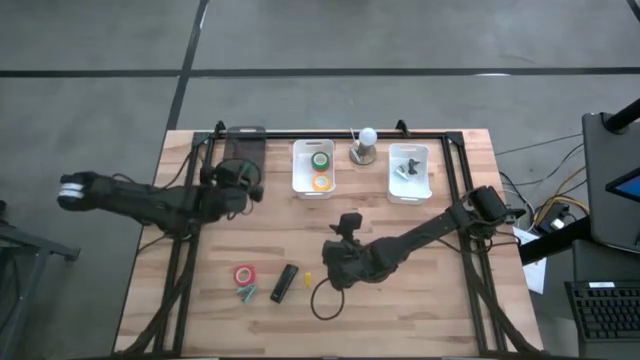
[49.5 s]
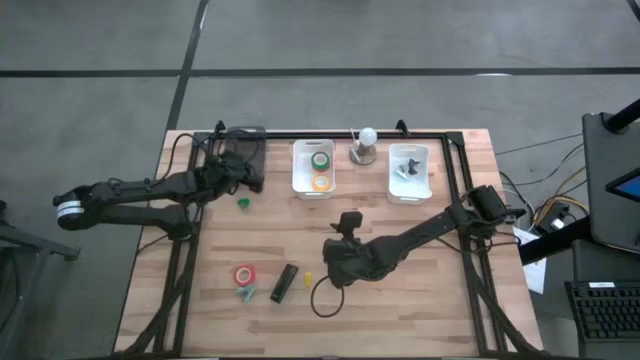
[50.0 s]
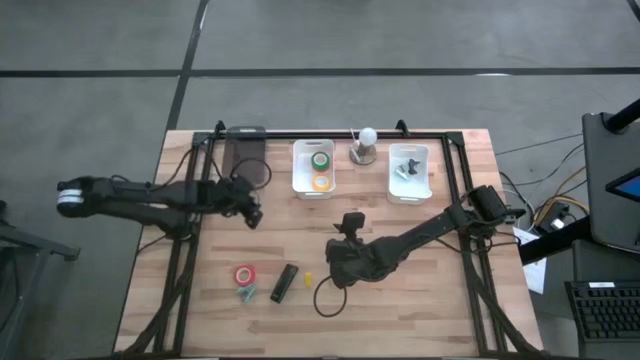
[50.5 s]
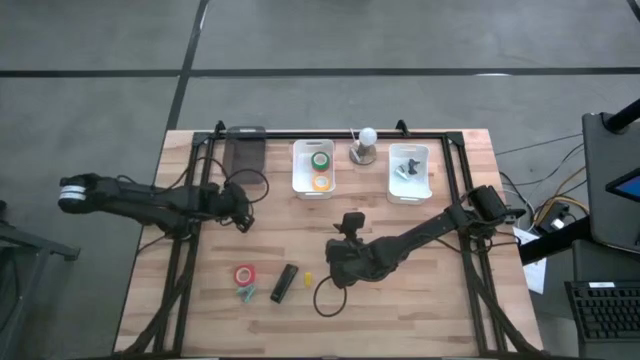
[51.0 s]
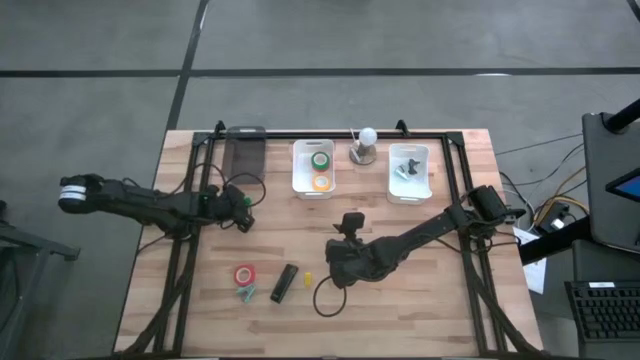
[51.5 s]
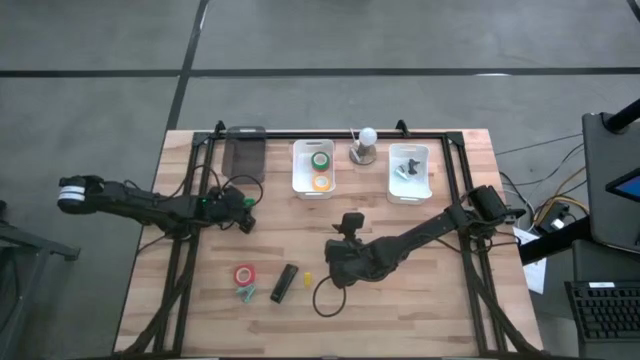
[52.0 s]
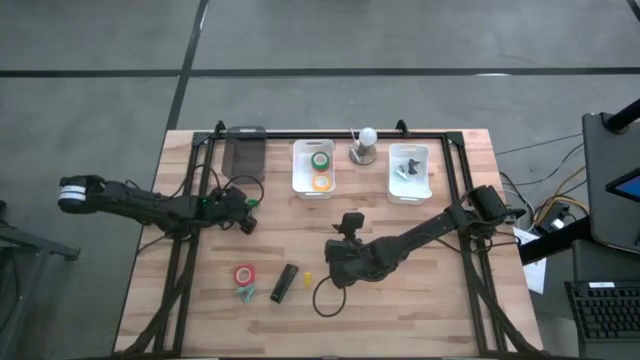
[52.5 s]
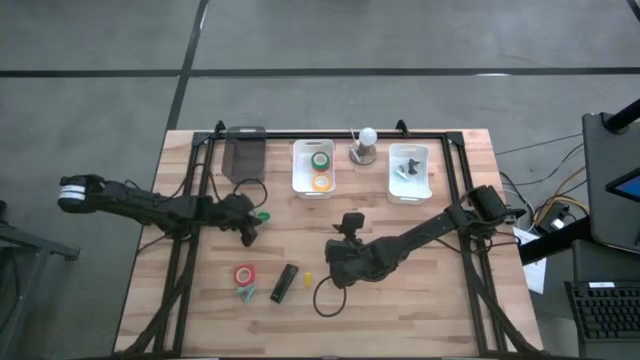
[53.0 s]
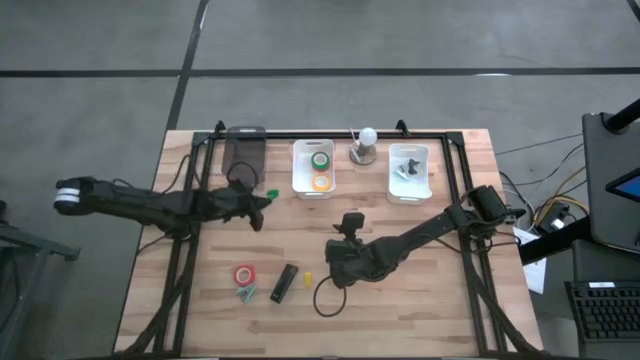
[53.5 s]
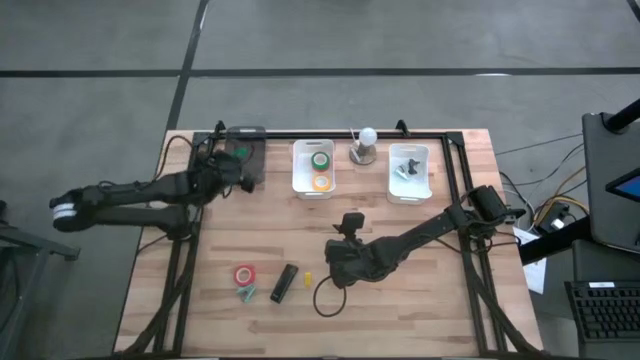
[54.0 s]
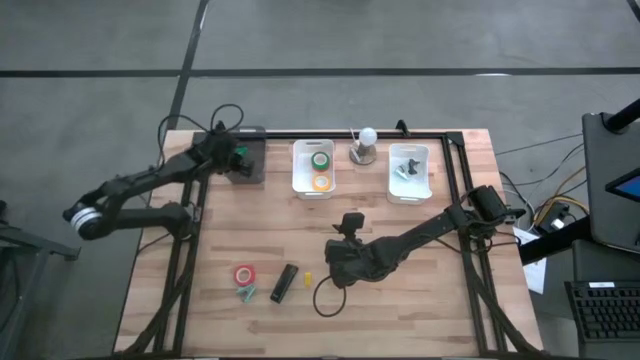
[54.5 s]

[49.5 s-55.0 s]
Task: Pick and place Stapler, Stapler remover, tape
Put the green stapler into the black bin

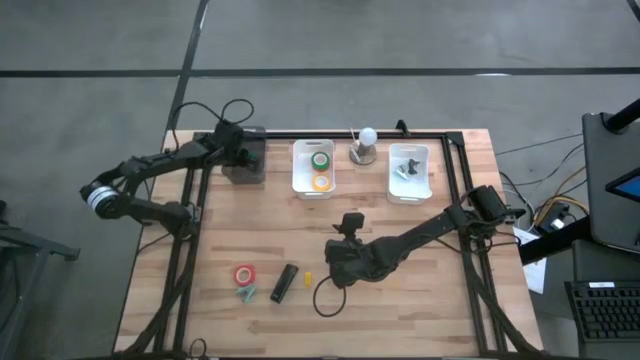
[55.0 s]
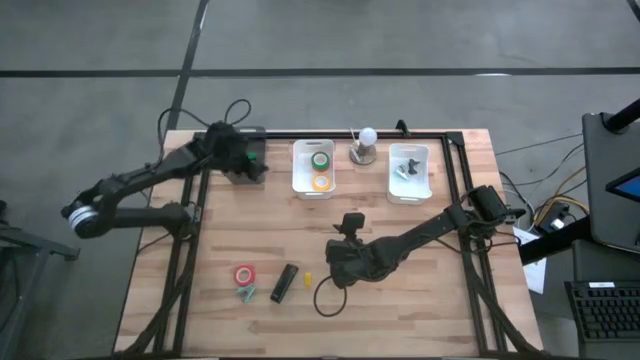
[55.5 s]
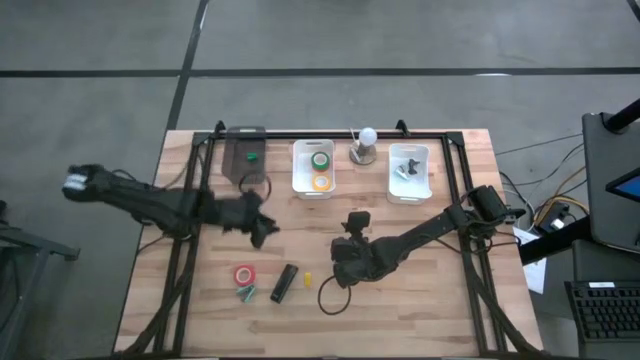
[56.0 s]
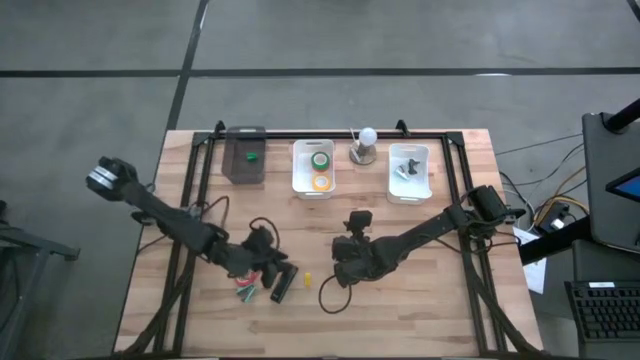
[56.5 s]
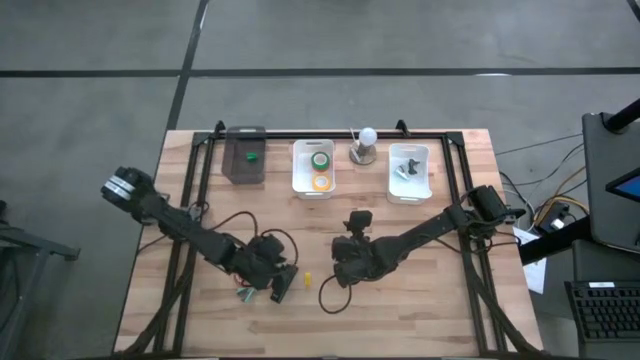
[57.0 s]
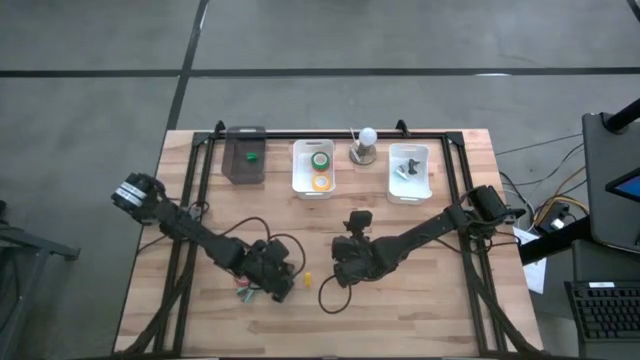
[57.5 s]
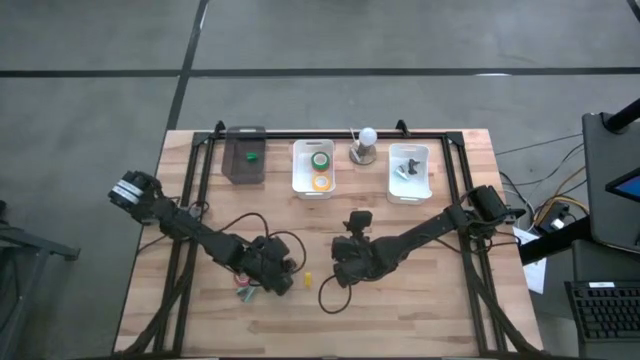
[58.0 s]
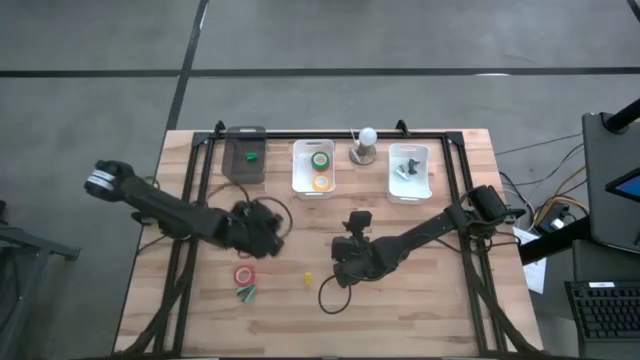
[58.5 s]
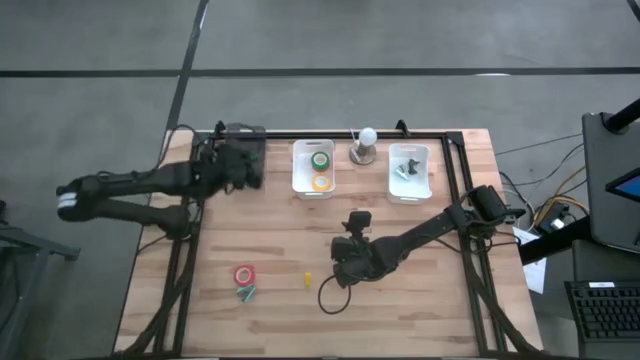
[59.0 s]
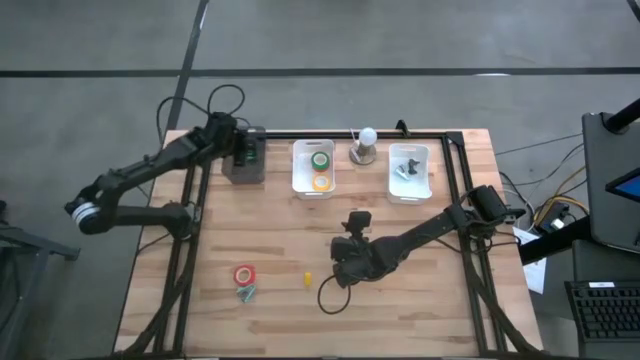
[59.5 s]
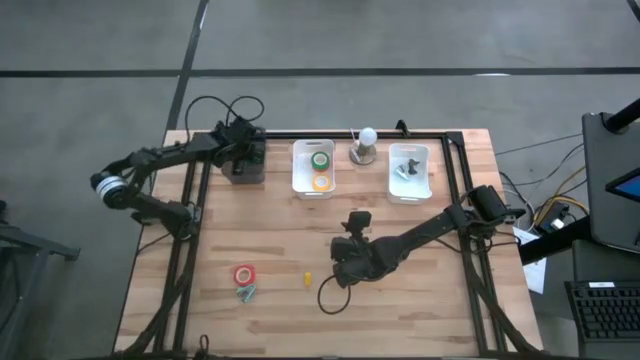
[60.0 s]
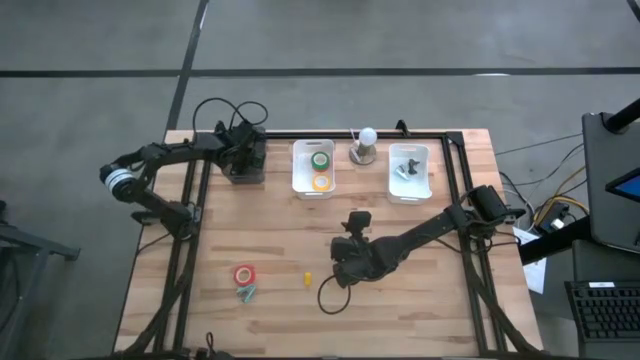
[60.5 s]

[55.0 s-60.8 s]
Put the black stapler into the black bin

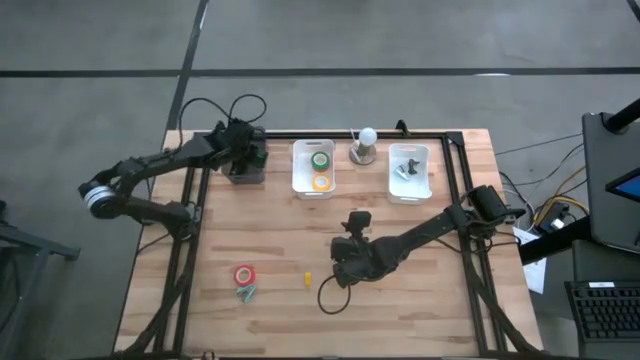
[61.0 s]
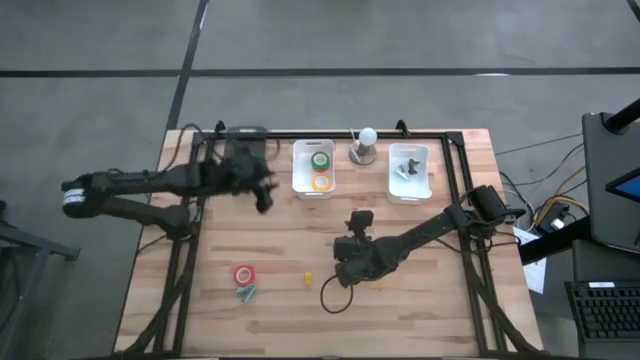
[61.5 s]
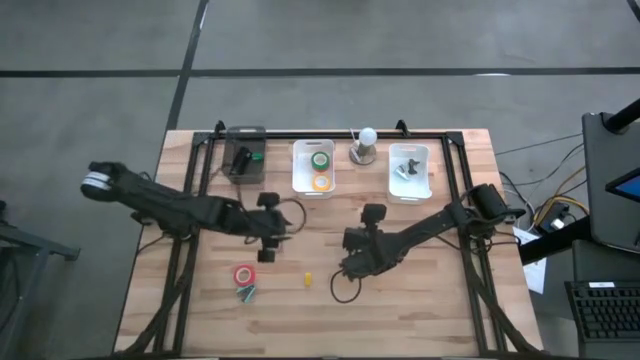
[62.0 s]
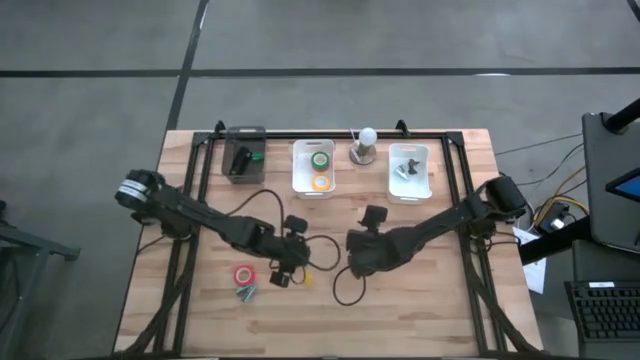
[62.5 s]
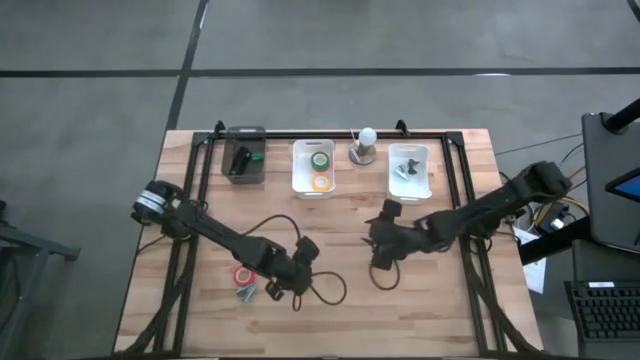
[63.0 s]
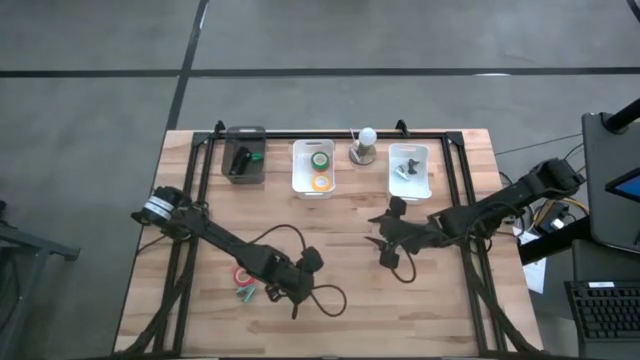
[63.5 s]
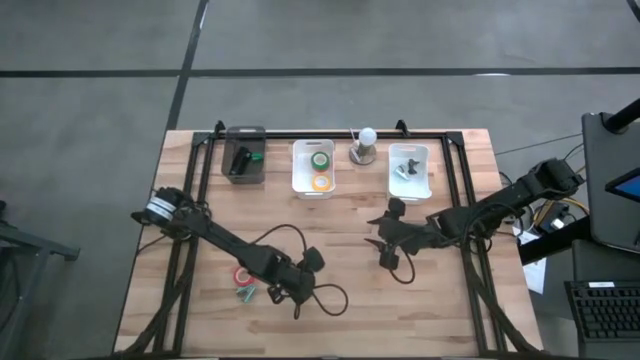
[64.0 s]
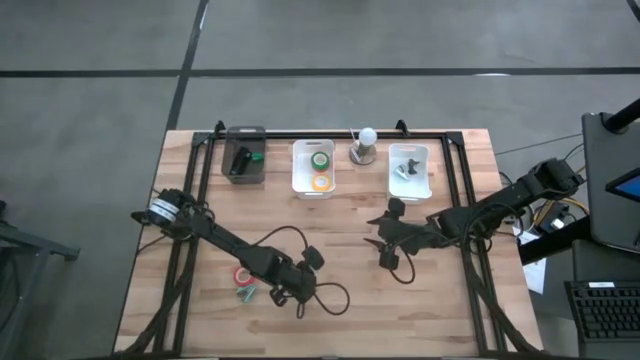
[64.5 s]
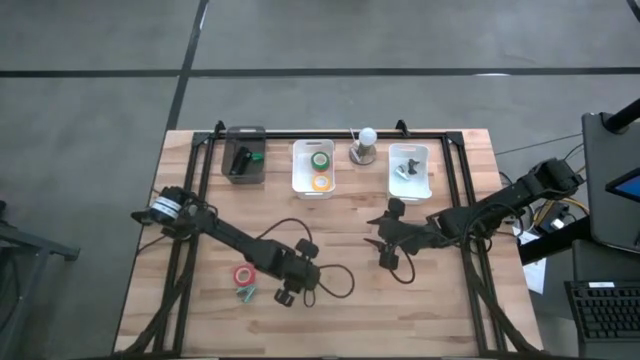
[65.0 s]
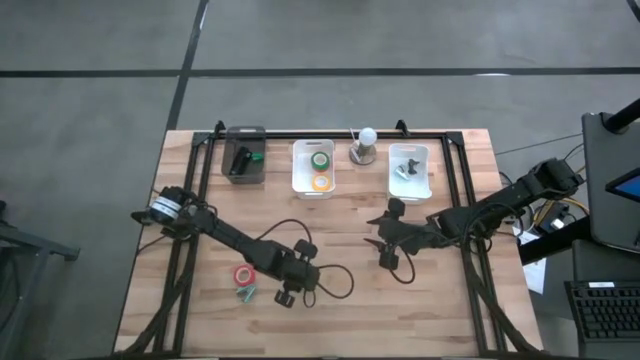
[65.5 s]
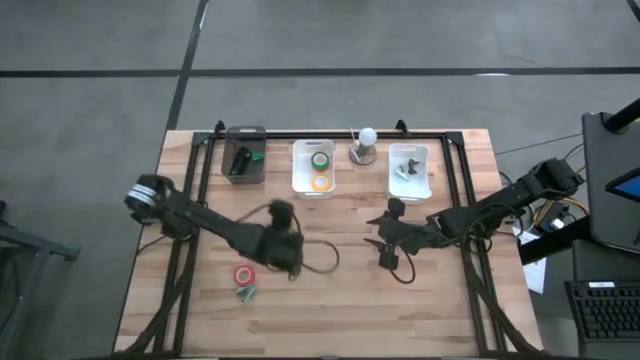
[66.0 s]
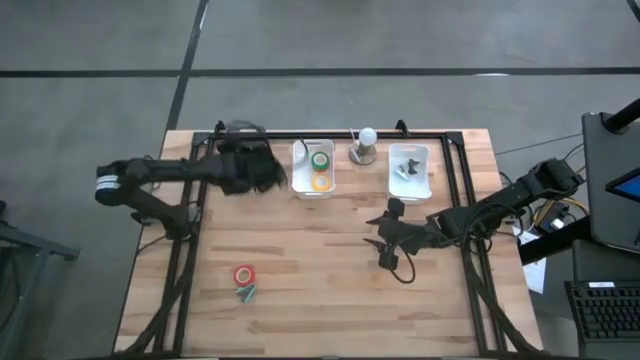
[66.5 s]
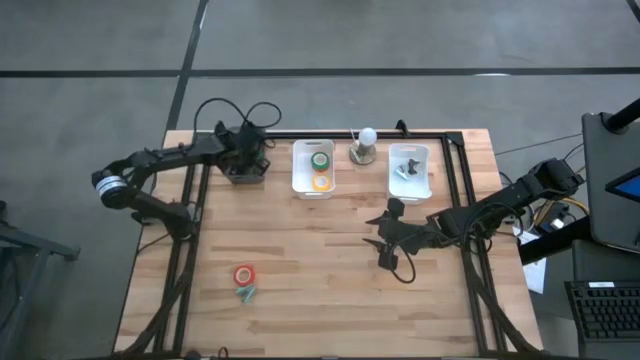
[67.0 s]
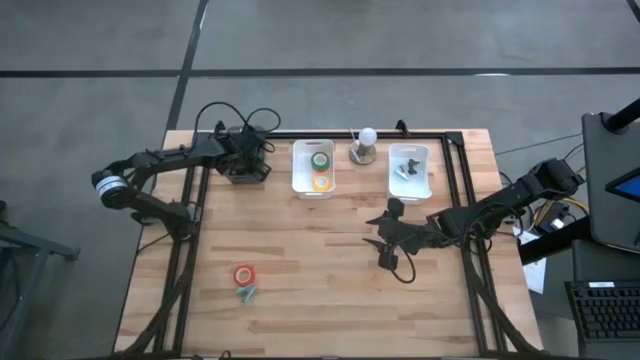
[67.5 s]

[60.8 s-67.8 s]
Put the yellow stapler into the black bin

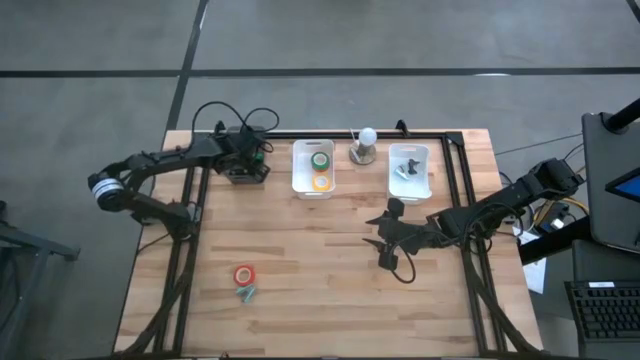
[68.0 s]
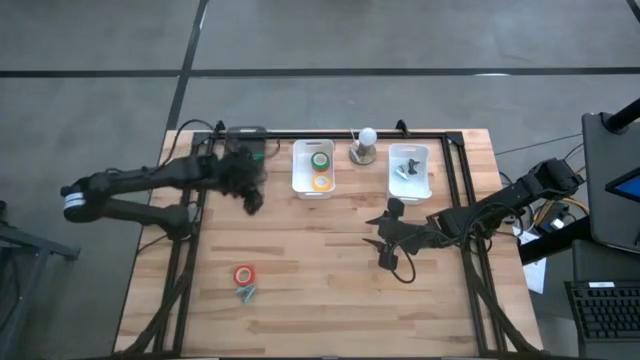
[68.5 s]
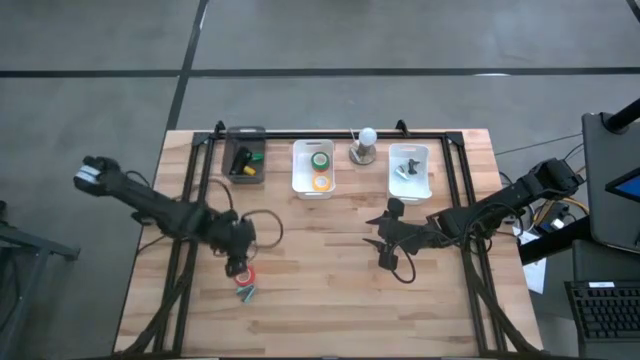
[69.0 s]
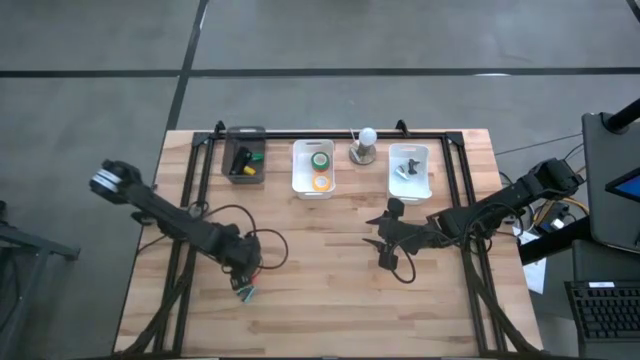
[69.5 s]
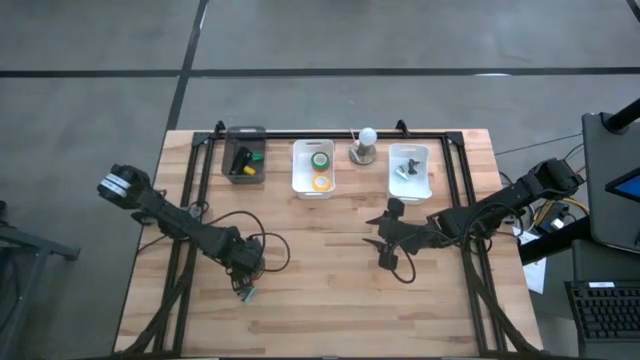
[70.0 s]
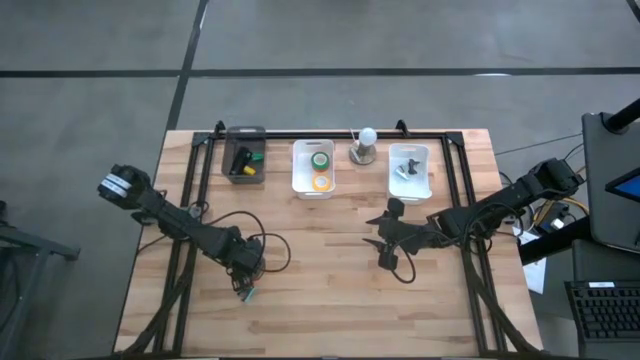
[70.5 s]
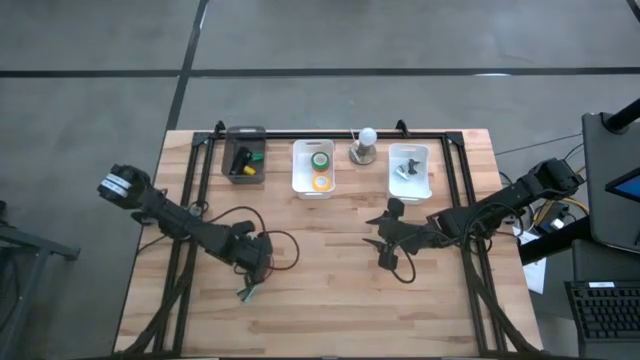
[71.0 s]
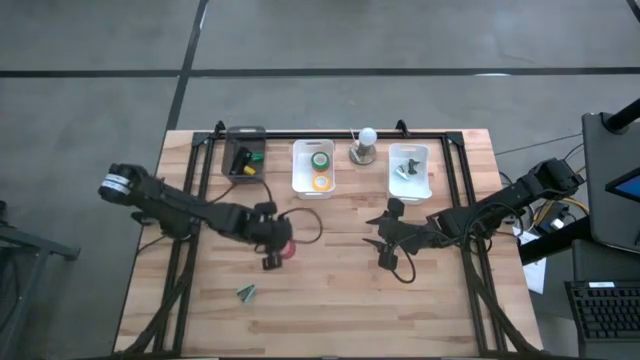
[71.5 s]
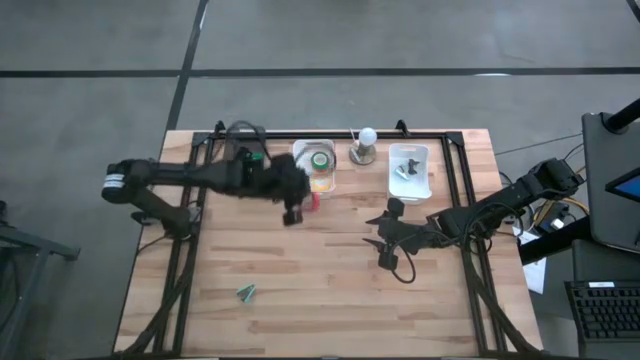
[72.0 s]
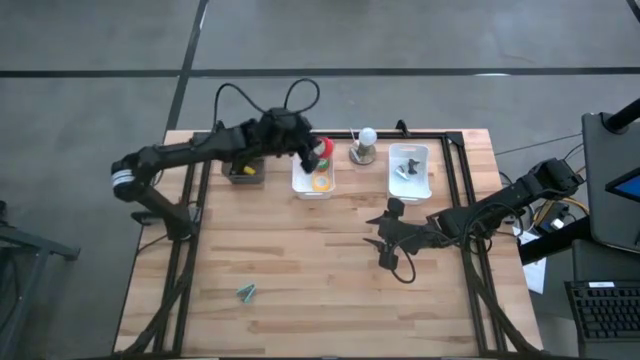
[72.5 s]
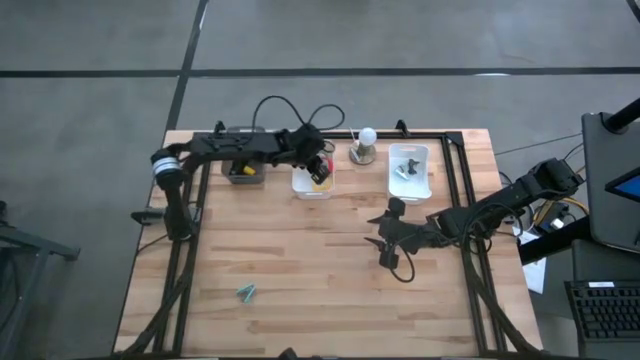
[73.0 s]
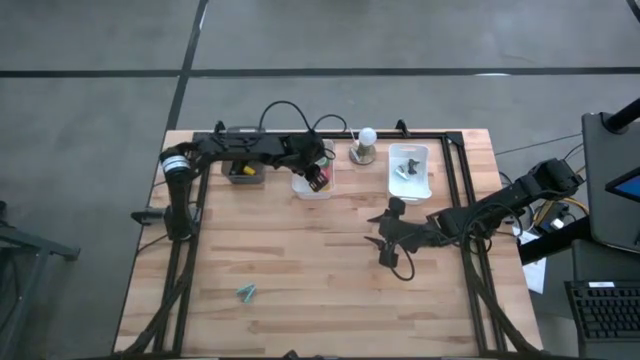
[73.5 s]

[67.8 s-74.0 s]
Put the orange tape into the left white bin
